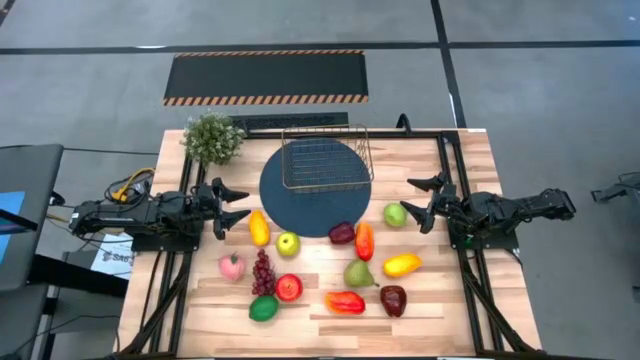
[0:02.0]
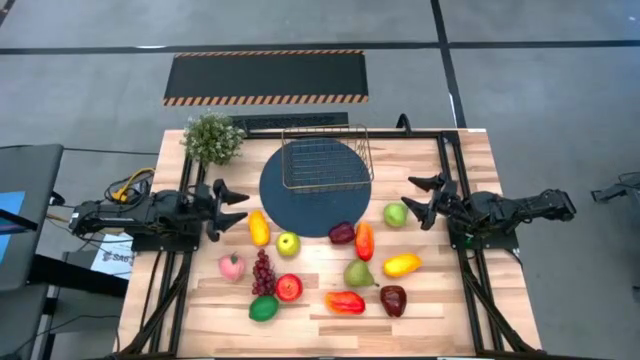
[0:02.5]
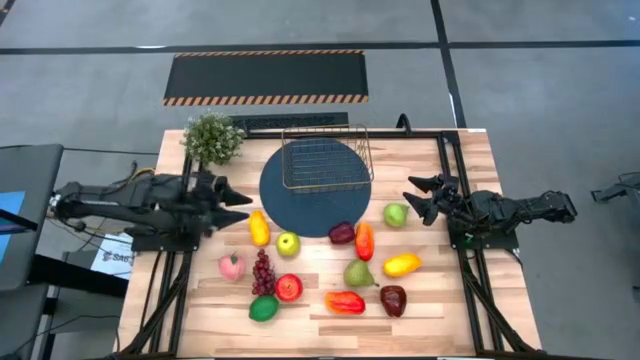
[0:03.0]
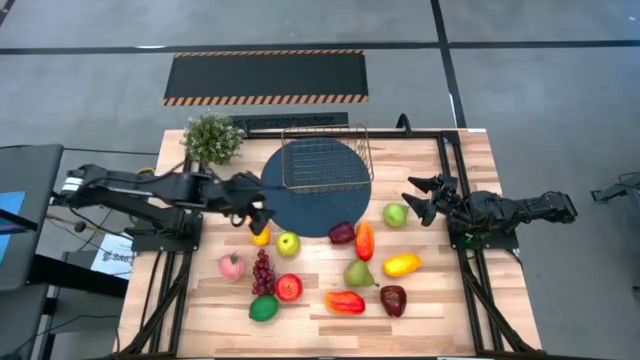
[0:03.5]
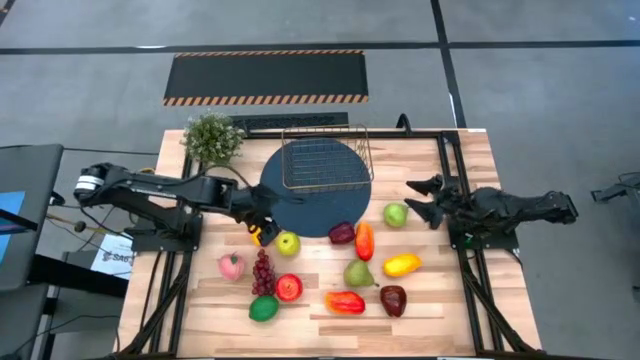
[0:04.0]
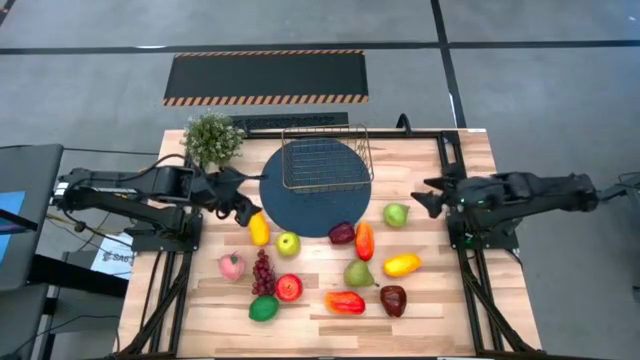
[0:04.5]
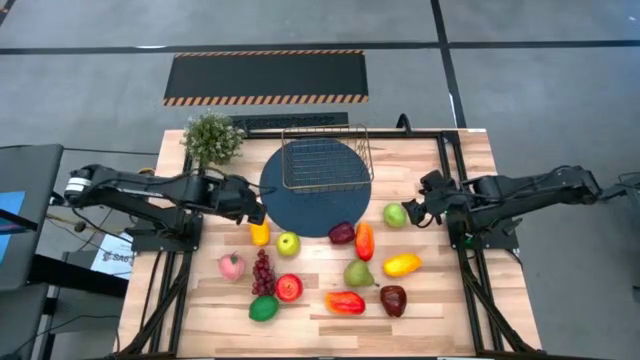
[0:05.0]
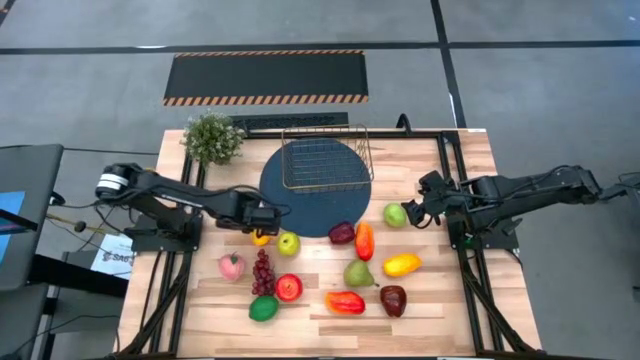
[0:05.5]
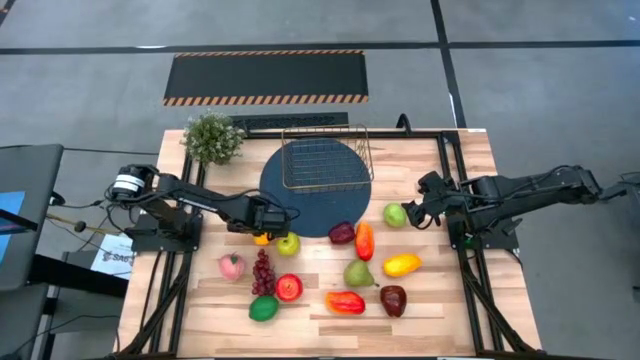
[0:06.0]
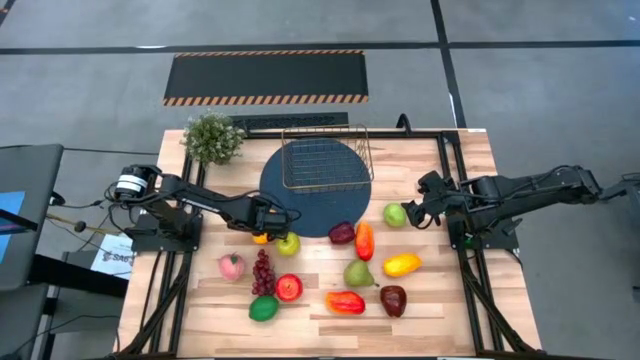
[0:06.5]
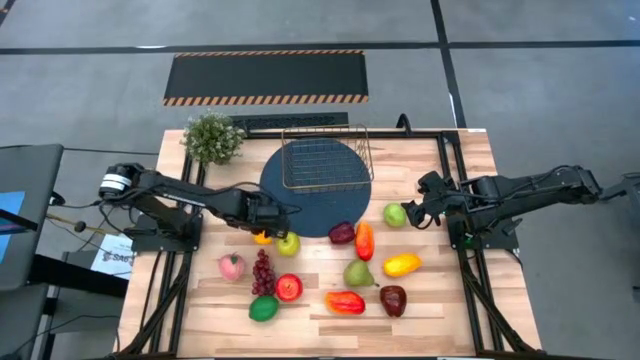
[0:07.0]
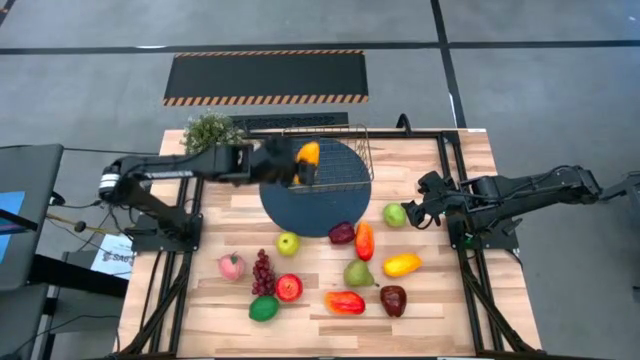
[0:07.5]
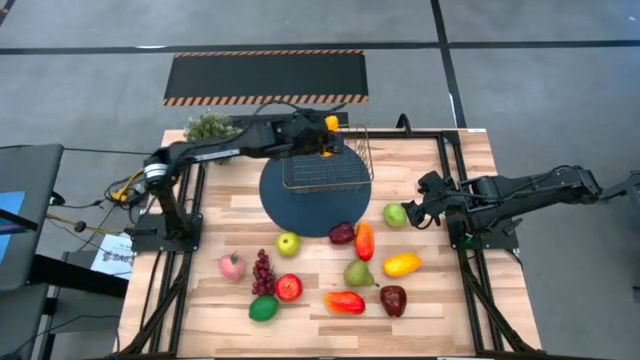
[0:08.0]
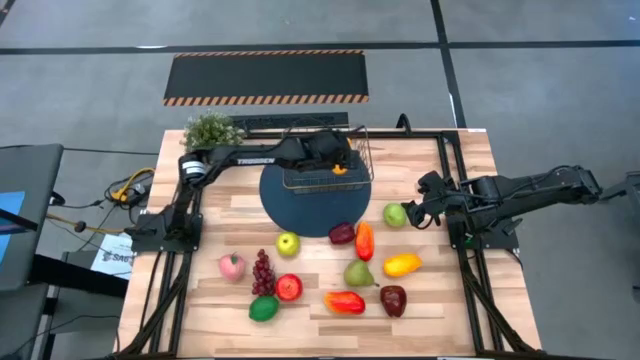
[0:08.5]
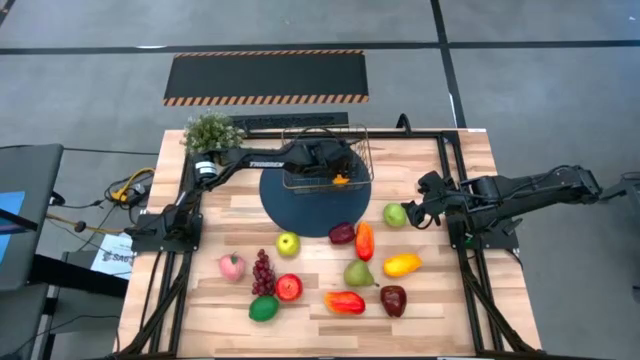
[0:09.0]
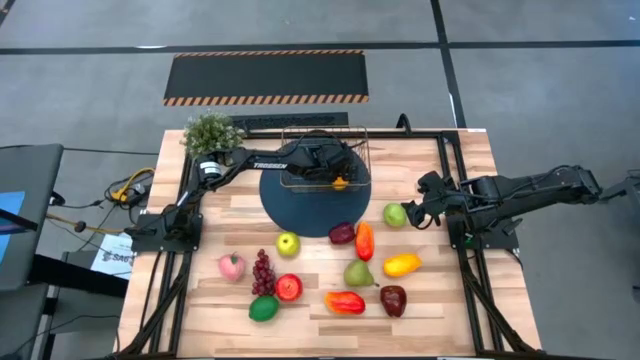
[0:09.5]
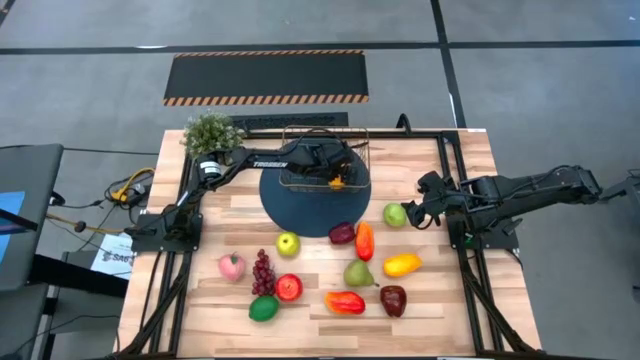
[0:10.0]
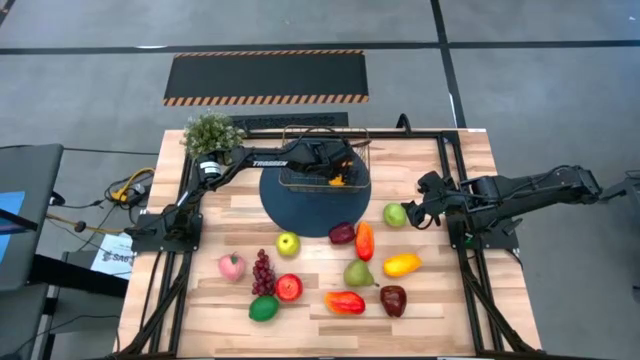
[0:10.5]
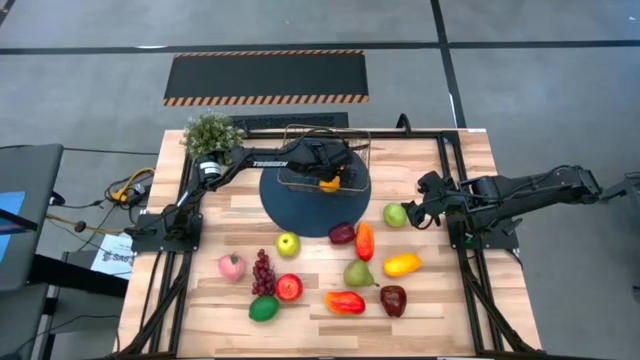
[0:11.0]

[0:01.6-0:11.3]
Task: Build produce basket
Put the top yellow mango into the wire basket

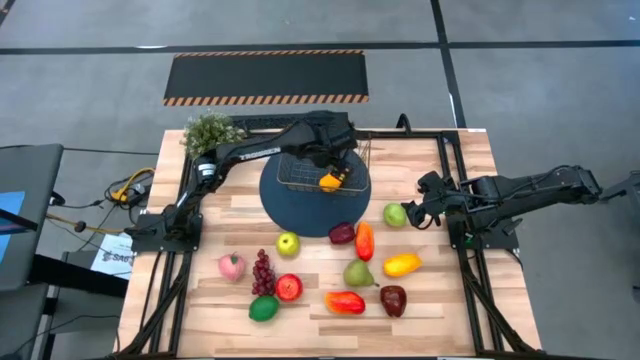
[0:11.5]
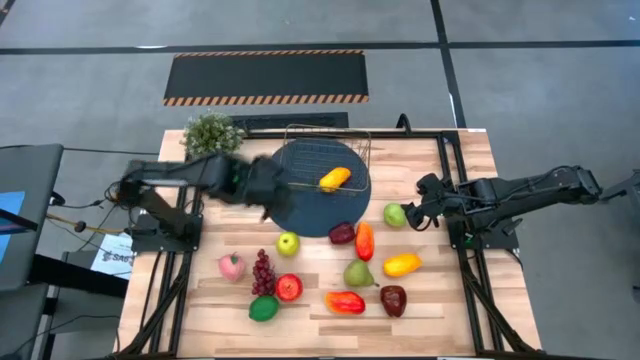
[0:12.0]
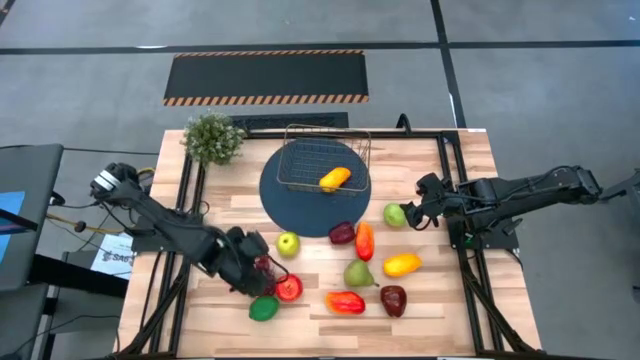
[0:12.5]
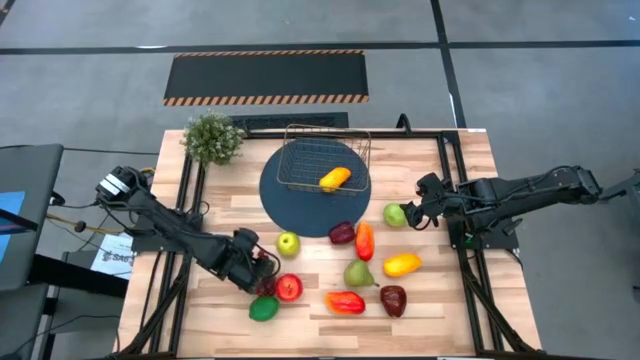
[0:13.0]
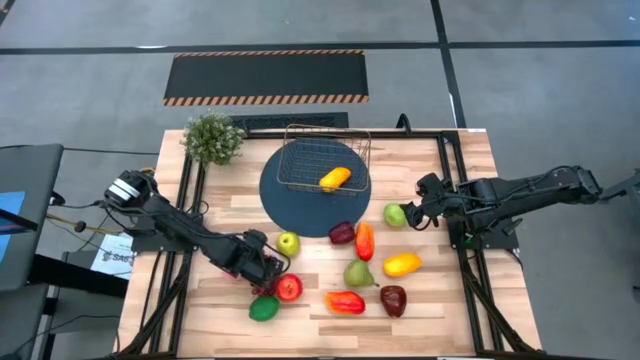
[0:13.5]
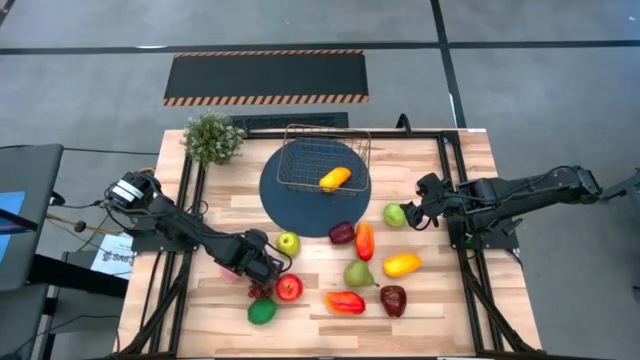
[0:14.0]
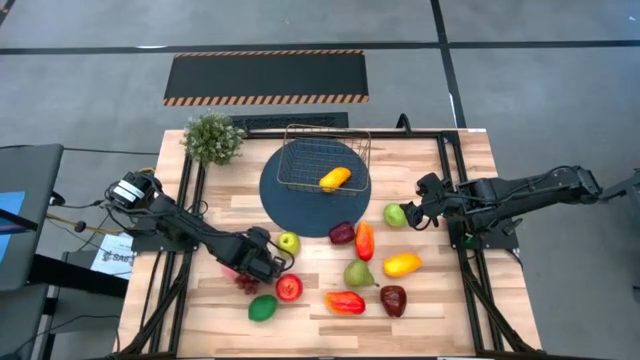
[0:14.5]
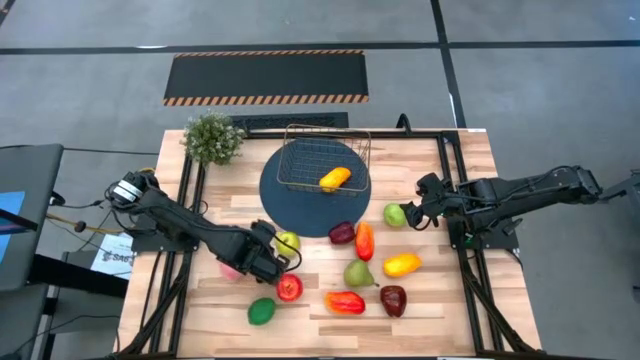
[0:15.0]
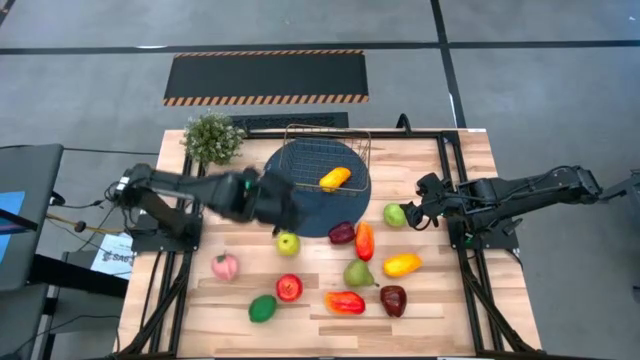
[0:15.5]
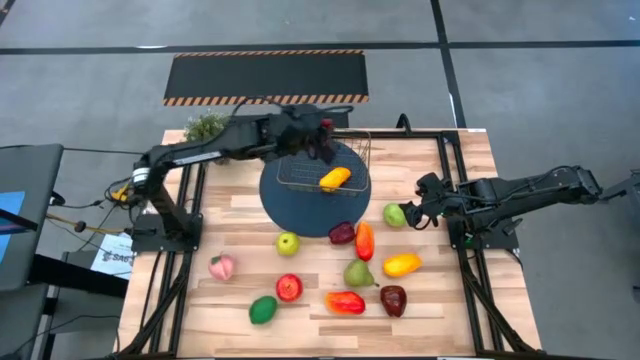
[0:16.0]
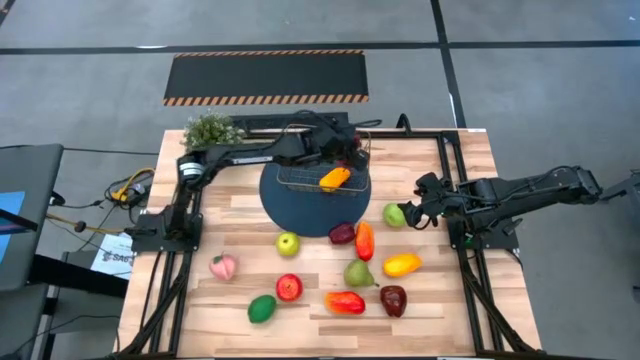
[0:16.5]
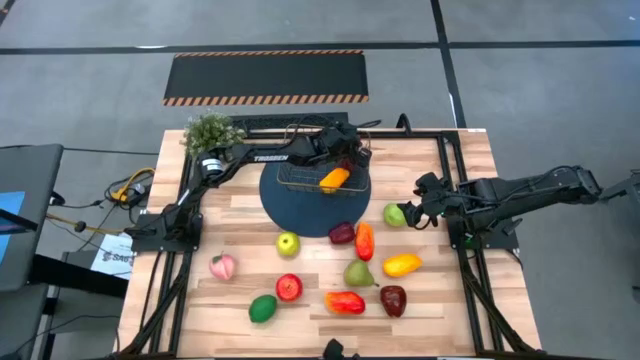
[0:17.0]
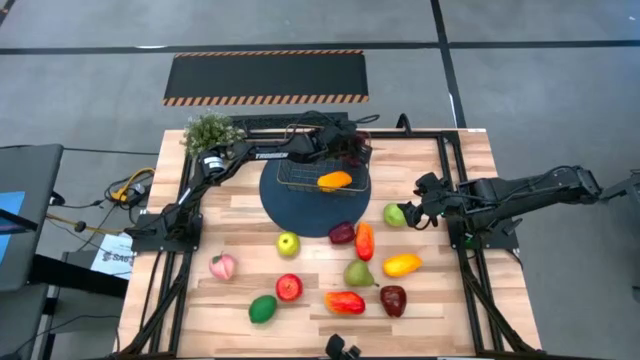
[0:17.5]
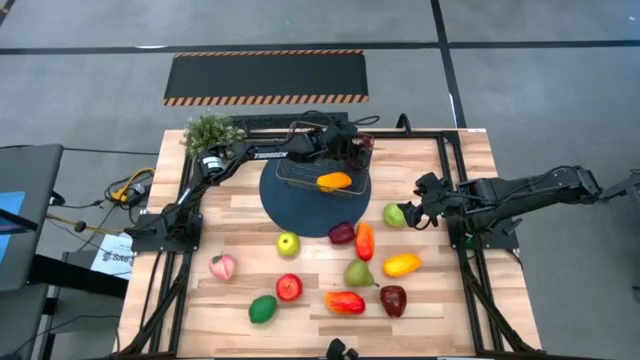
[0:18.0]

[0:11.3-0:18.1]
Put the grapes into the wire basket

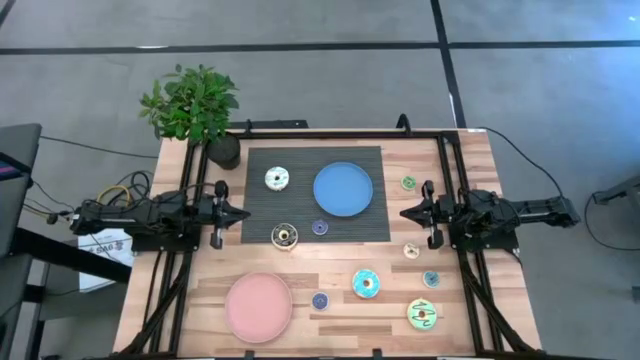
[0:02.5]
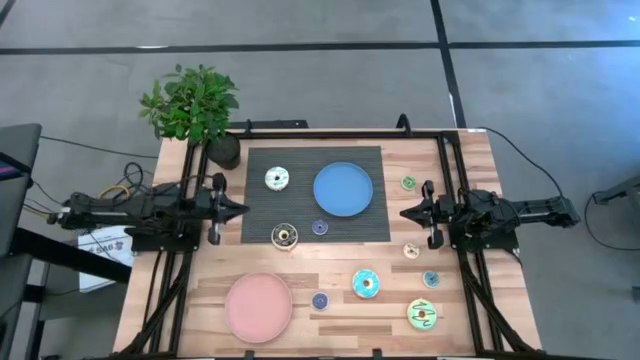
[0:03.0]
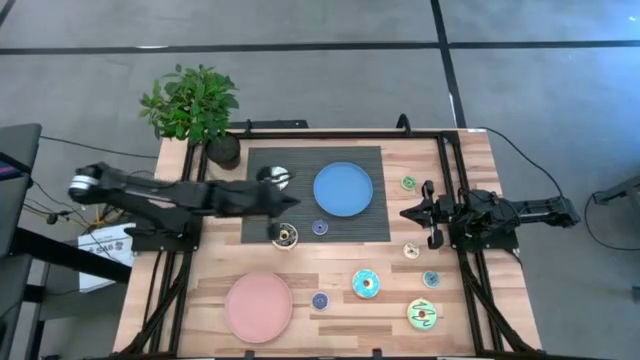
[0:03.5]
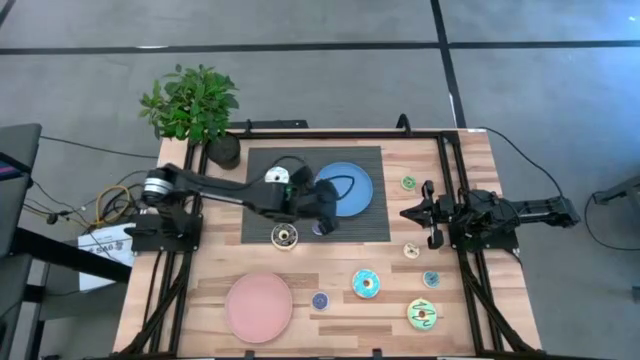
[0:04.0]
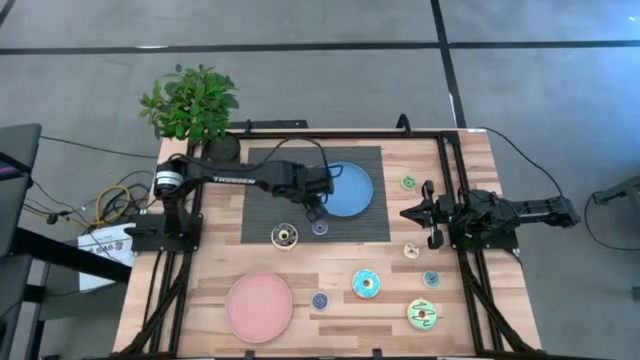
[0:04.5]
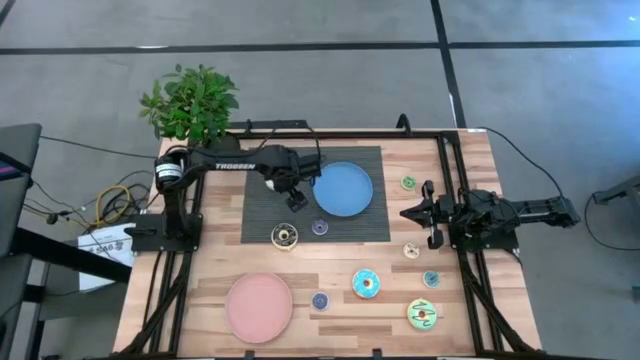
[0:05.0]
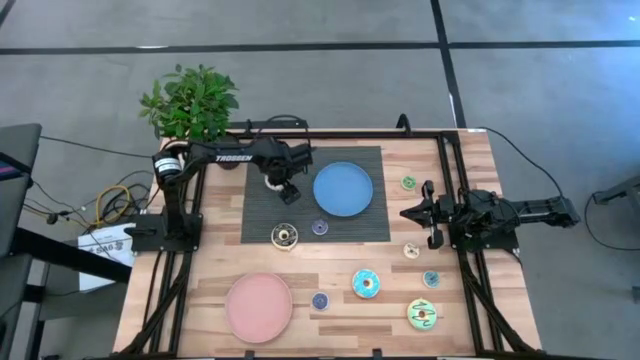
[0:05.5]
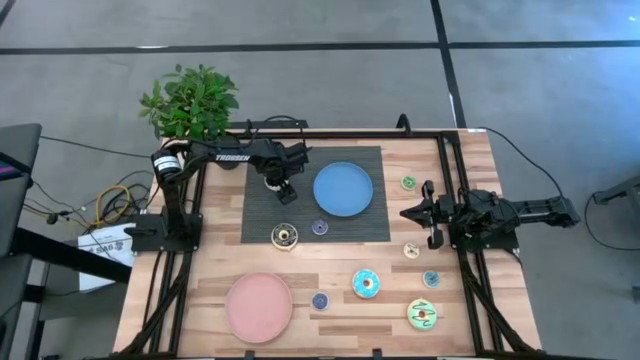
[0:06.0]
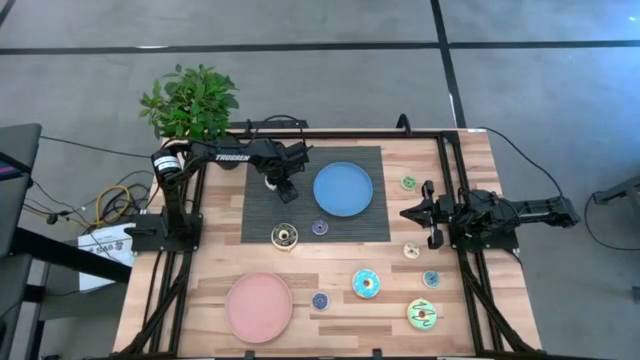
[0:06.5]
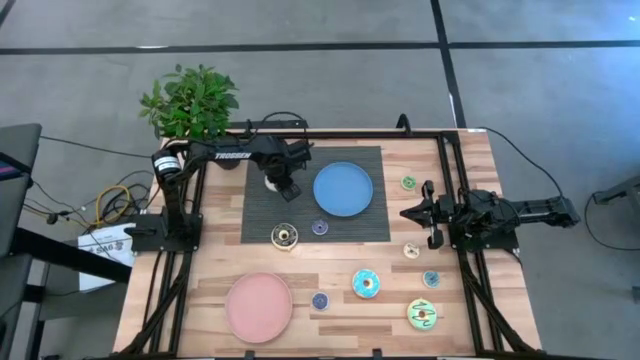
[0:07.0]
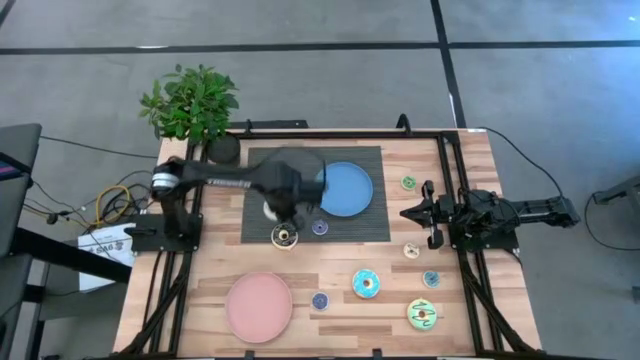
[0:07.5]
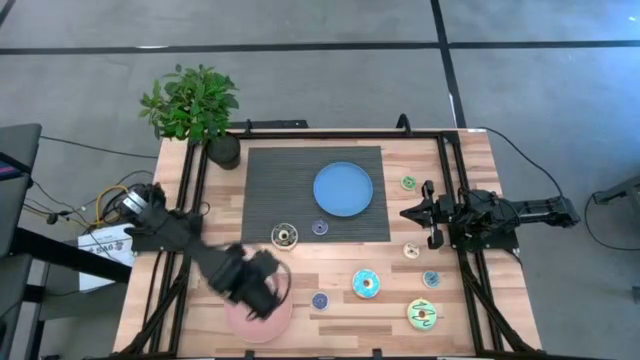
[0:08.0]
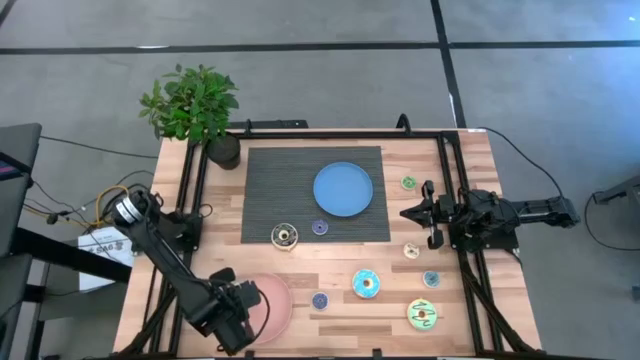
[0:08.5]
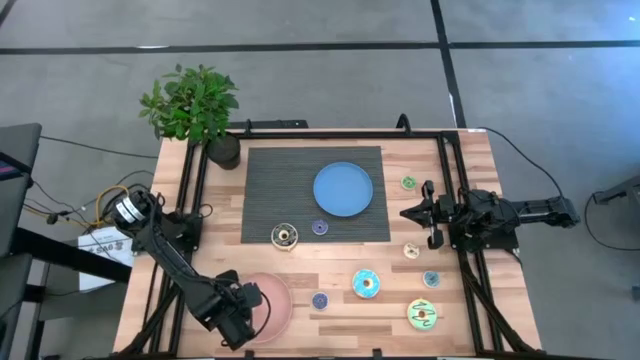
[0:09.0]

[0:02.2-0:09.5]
Task: Pick & Place donuts
Put the big white donut on the light orange plate
